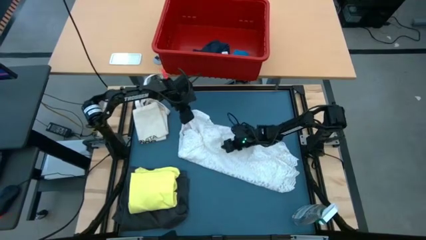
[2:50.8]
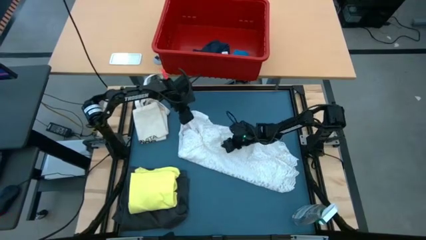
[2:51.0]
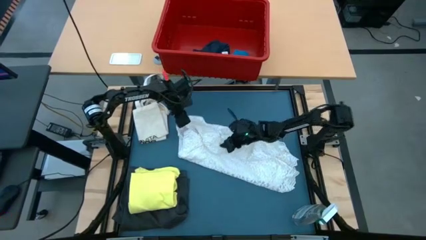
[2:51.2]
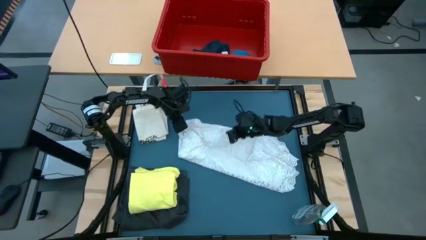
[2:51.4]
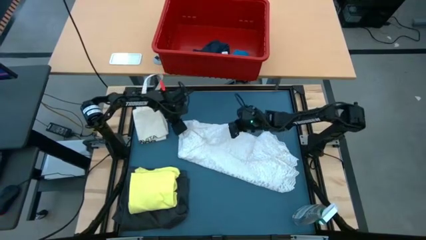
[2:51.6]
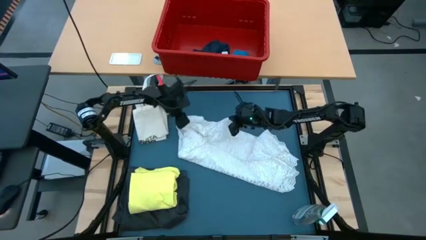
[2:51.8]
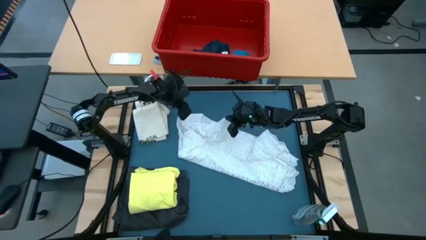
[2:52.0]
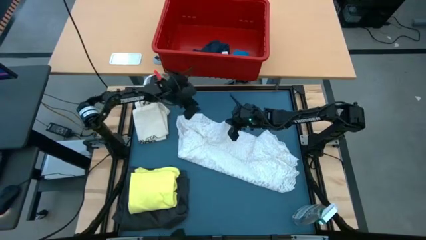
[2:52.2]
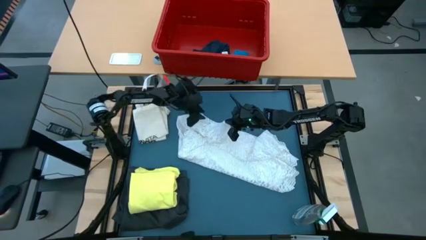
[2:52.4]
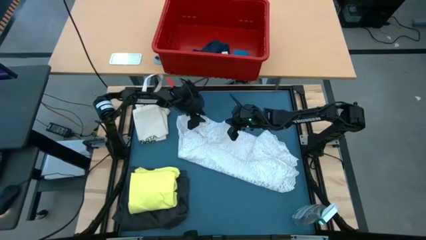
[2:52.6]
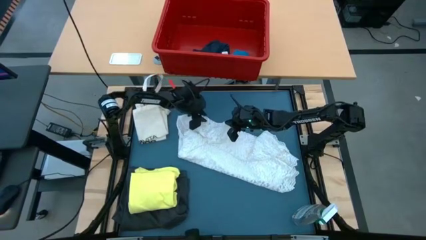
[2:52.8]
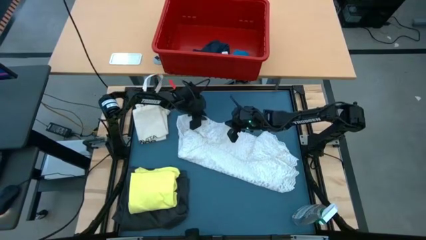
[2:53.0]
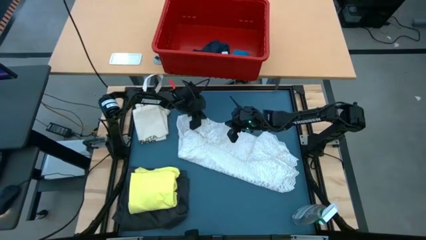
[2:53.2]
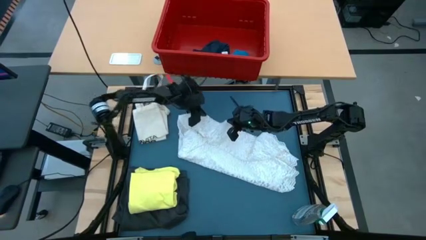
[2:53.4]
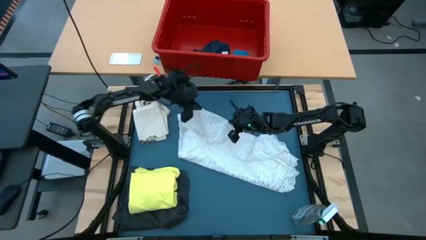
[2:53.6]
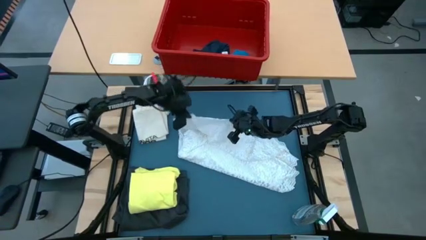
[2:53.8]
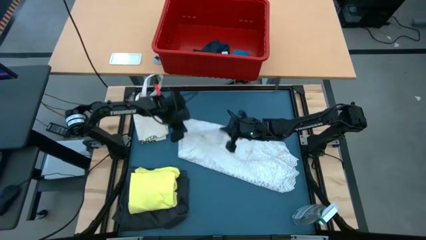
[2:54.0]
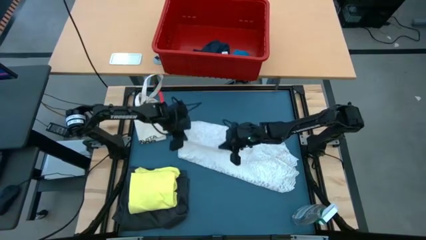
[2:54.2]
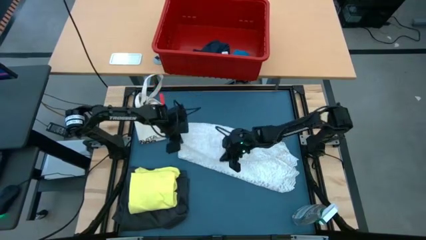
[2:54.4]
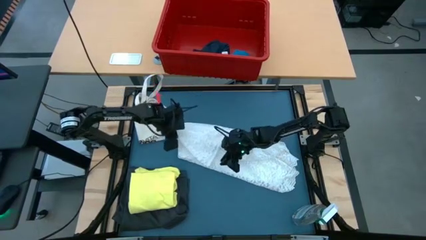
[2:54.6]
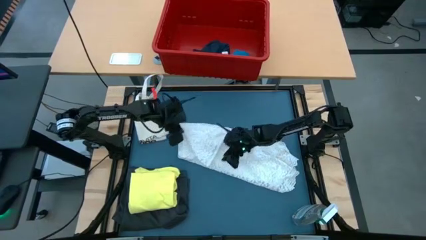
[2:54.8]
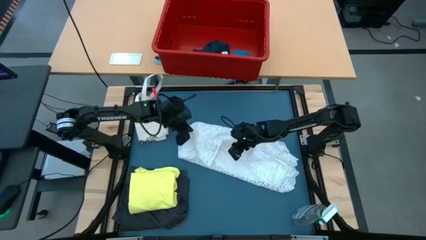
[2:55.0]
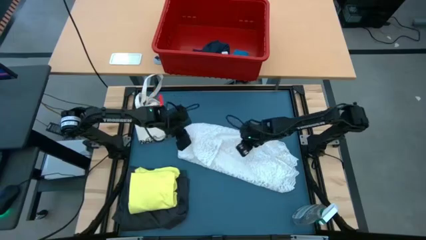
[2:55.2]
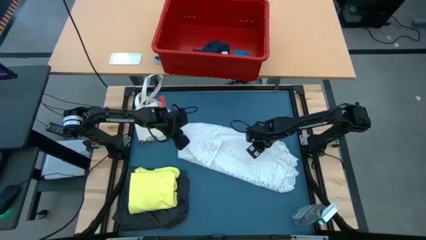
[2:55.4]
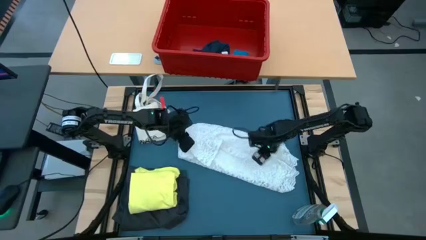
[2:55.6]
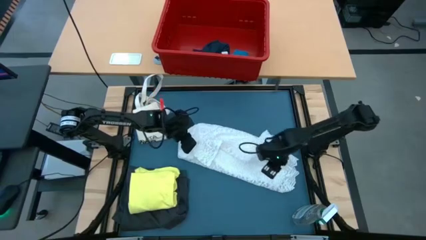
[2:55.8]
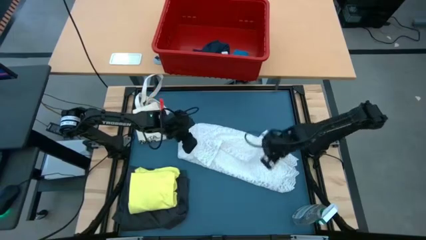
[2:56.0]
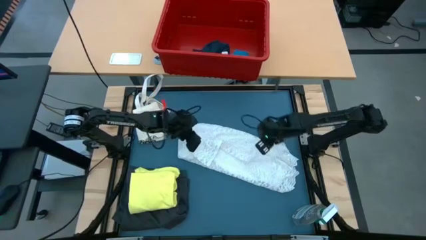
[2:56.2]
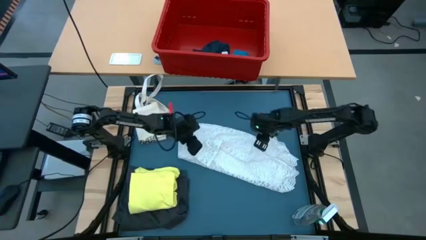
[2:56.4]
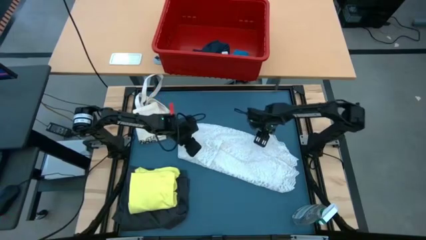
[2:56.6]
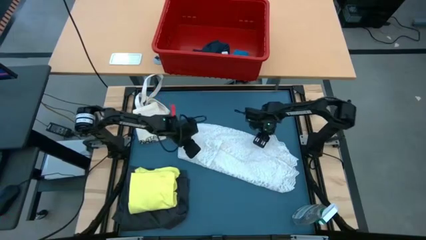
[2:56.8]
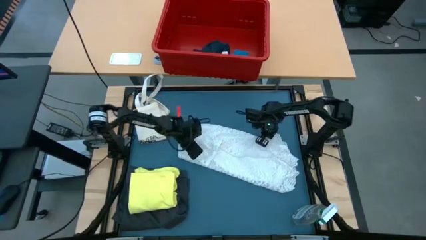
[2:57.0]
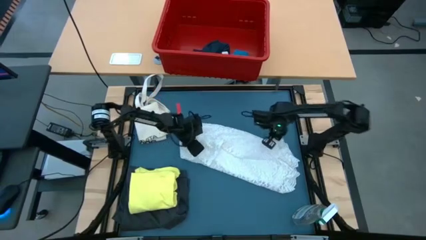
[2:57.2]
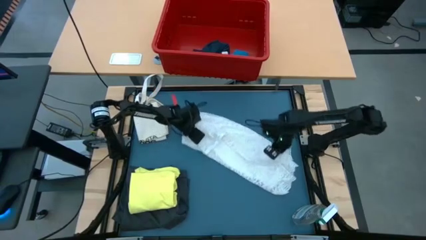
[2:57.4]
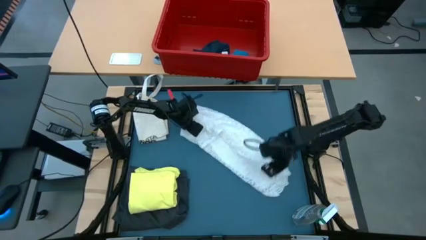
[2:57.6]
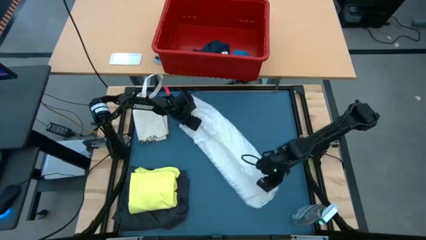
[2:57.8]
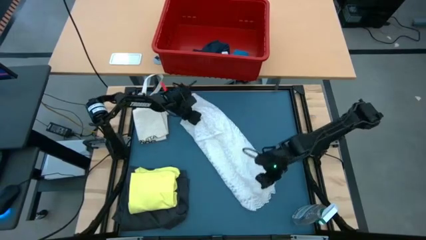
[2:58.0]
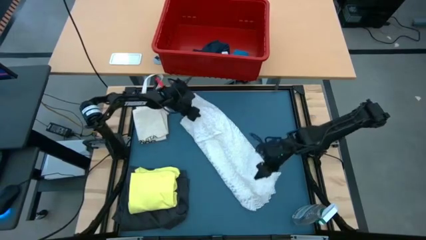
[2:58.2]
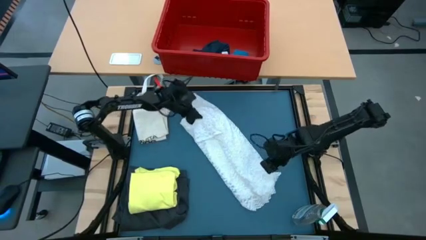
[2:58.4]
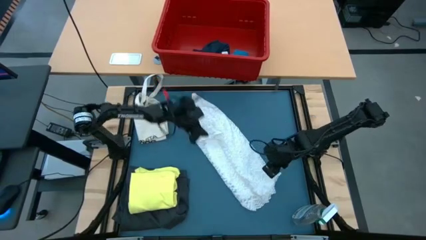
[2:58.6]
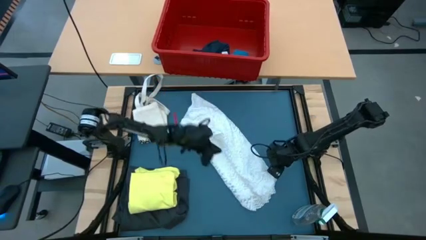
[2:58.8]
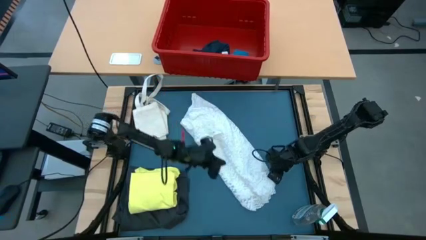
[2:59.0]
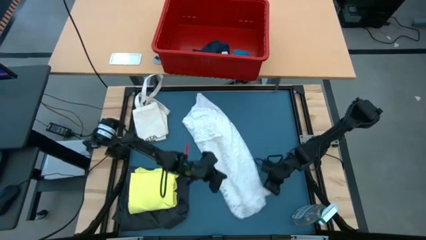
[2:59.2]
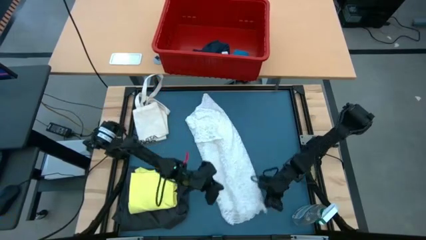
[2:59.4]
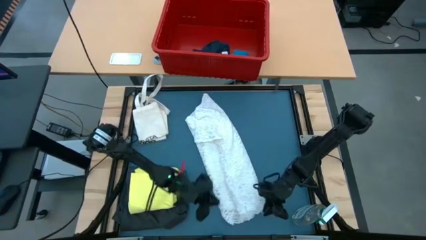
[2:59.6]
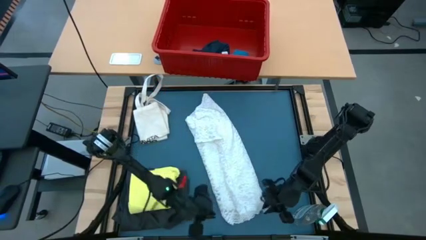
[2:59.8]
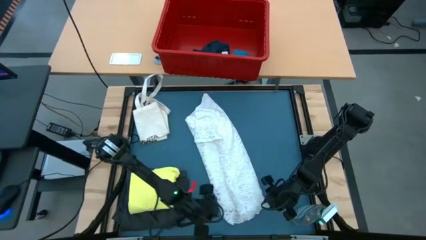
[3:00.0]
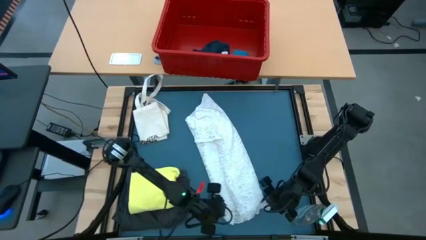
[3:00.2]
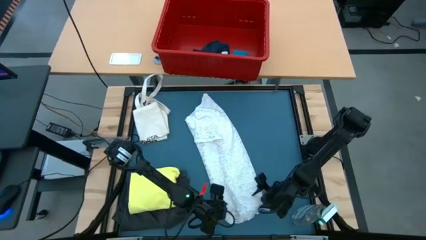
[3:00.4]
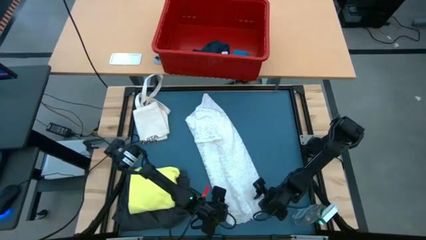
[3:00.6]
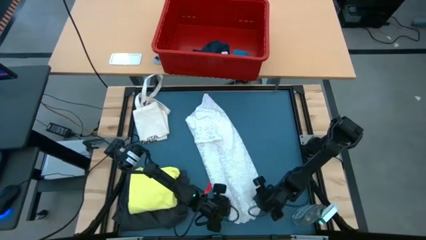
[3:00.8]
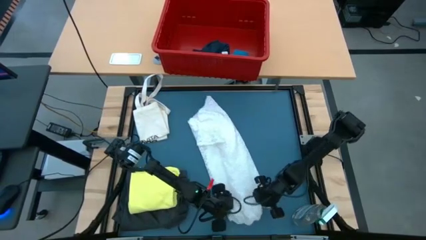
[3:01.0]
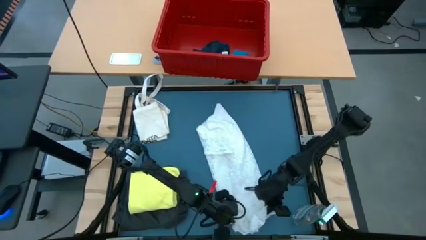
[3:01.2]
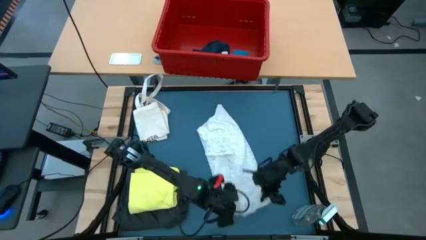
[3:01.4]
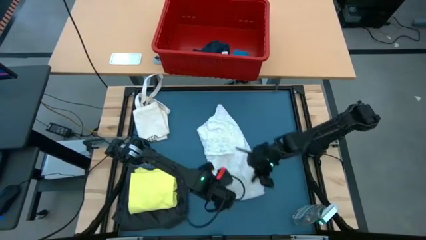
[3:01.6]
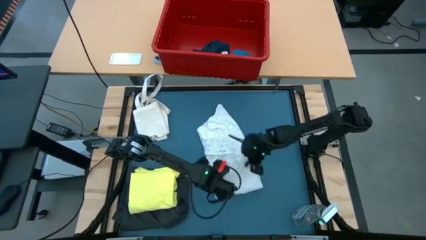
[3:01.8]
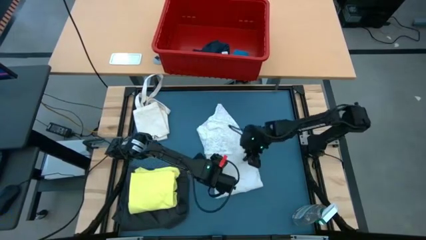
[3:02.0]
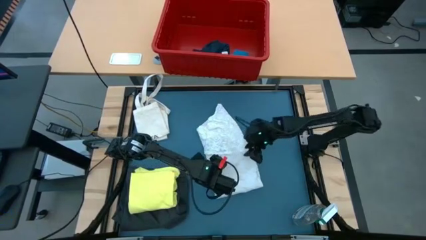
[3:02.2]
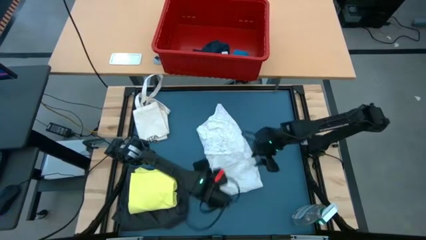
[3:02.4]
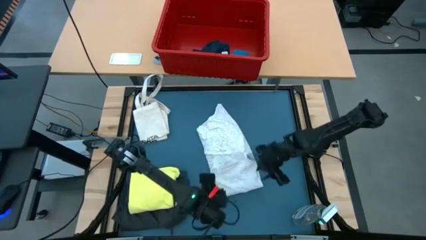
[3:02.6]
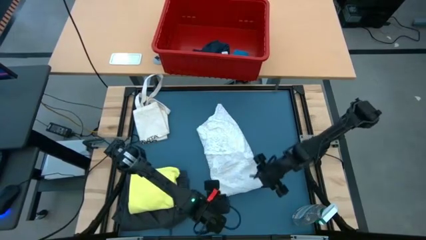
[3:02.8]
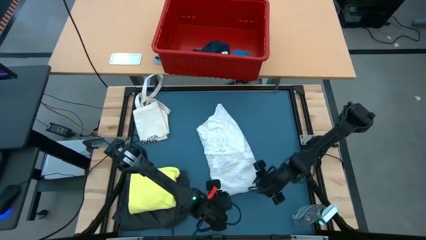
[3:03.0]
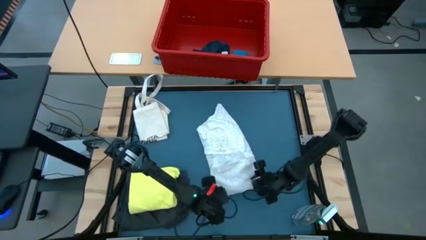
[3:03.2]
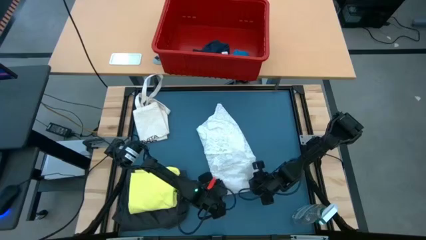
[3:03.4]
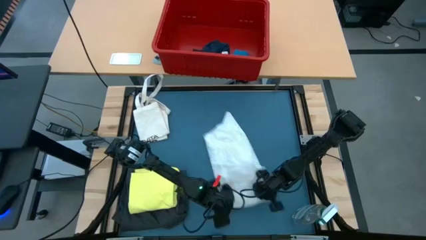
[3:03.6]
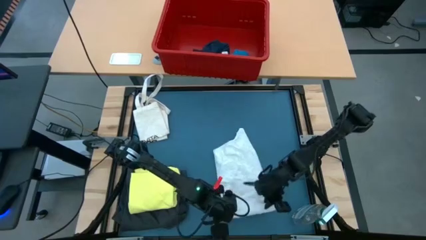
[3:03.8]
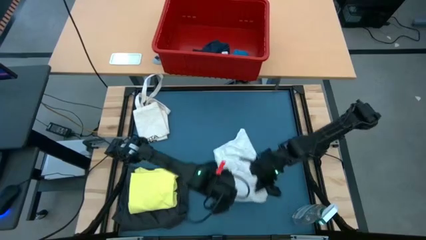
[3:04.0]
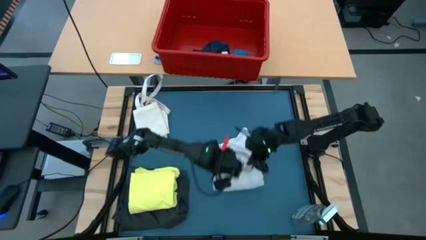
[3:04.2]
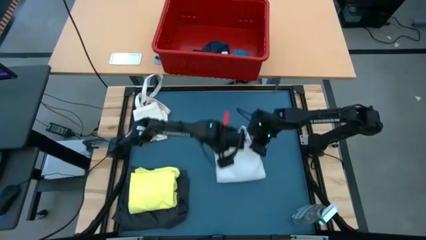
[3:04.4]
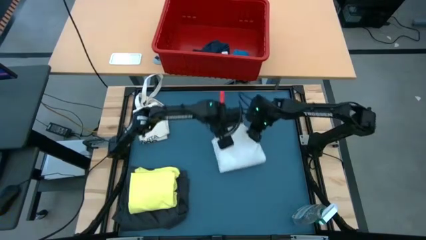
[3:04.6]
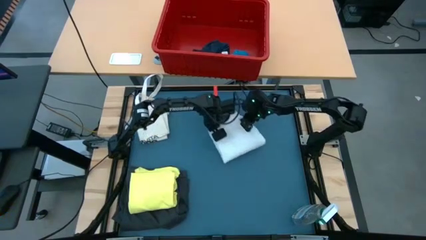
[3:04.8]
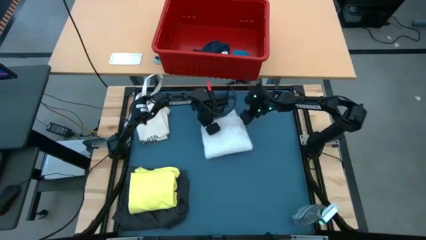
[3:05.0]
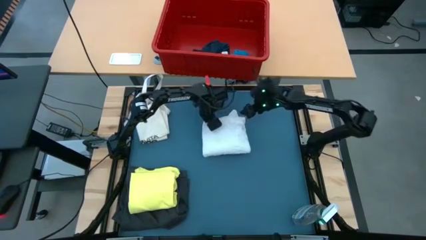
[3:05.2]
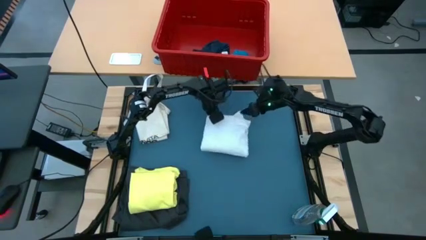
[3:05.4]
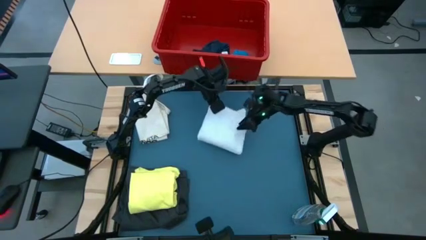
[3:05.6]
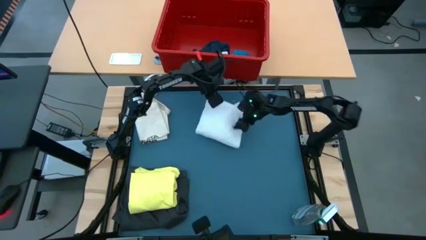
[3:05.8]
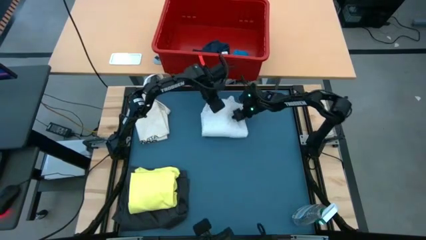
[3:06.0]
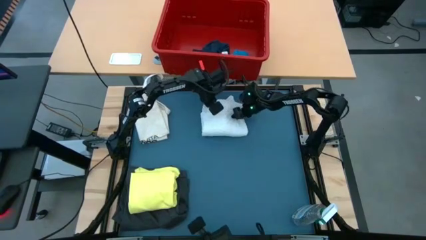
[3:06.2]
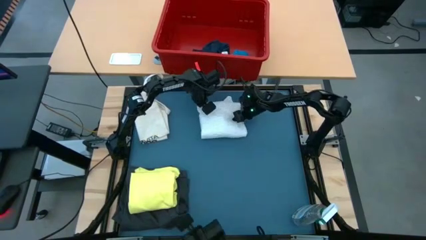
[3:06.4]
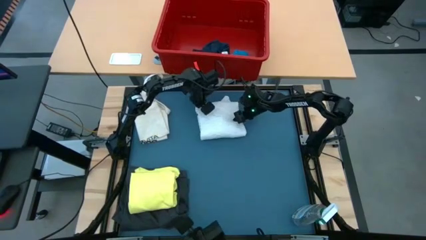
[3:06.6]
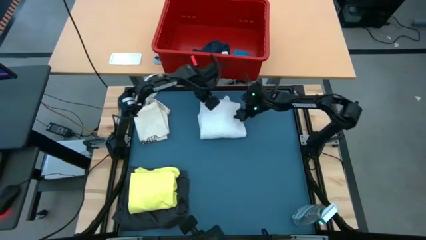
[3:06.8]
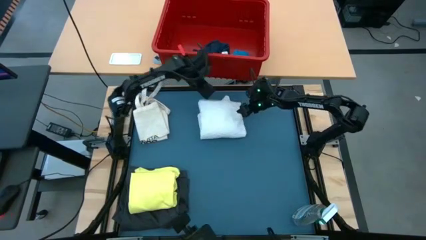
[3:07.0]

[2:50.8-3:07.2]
Task: Fold laundry
Fold the white blouse
